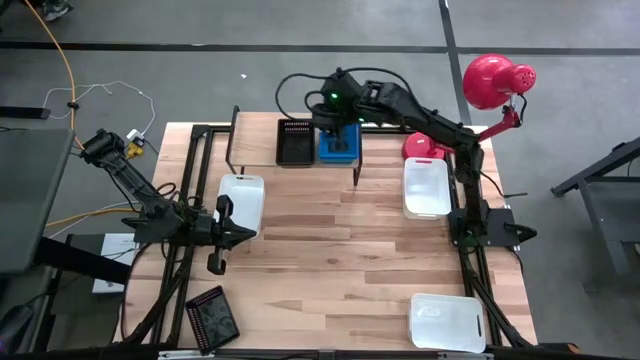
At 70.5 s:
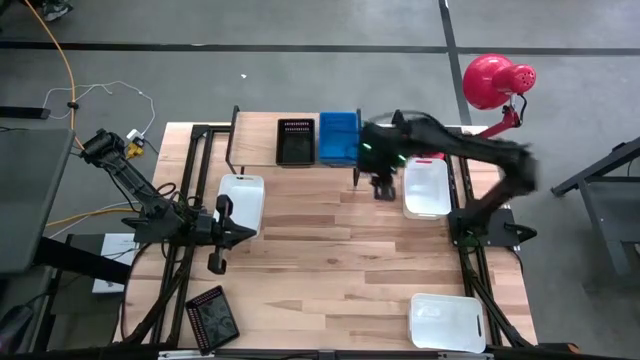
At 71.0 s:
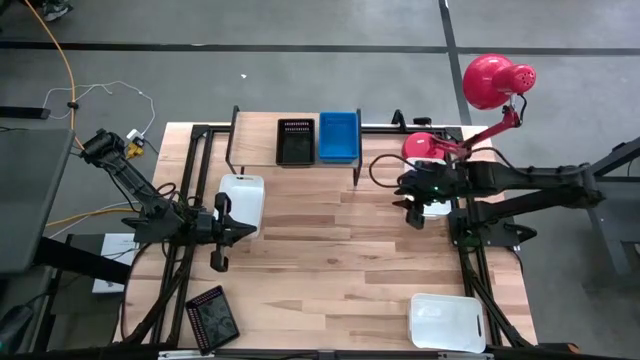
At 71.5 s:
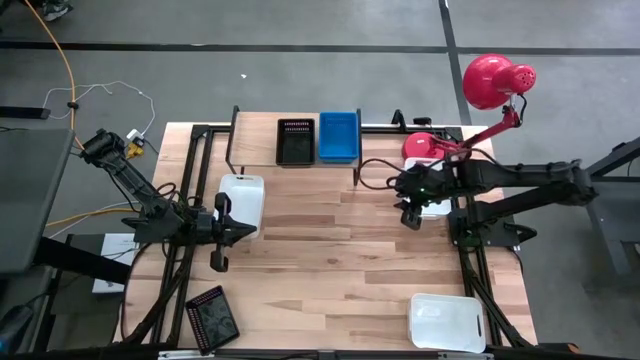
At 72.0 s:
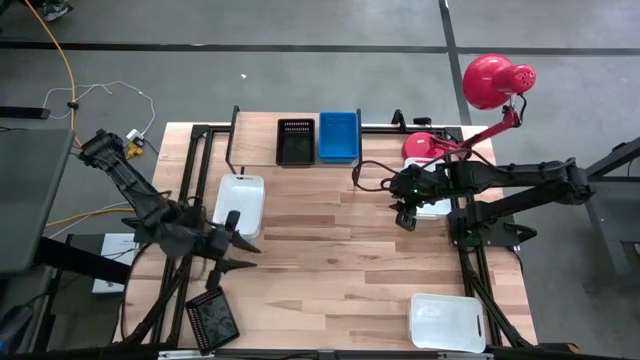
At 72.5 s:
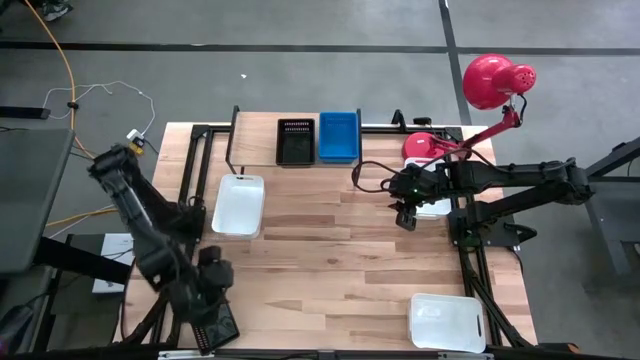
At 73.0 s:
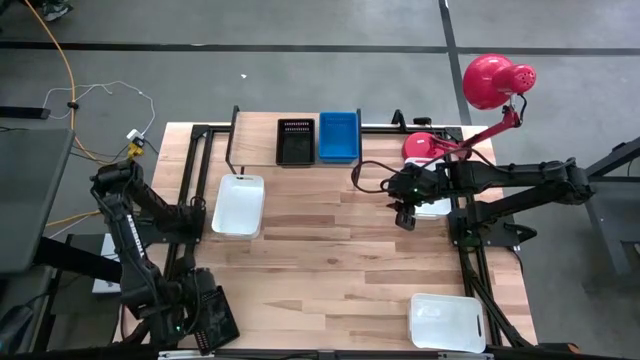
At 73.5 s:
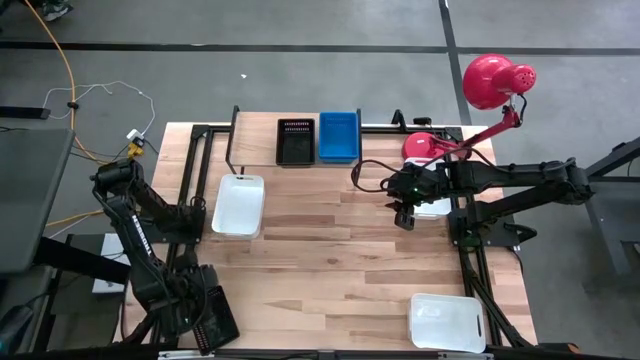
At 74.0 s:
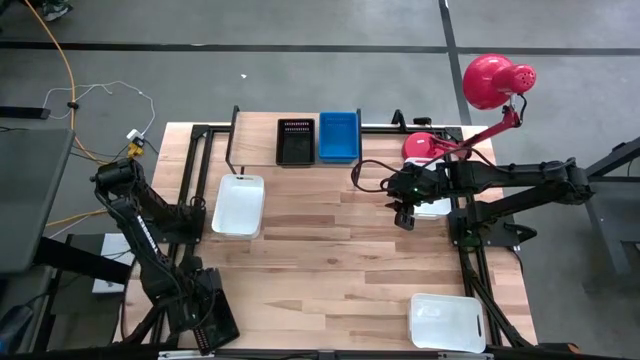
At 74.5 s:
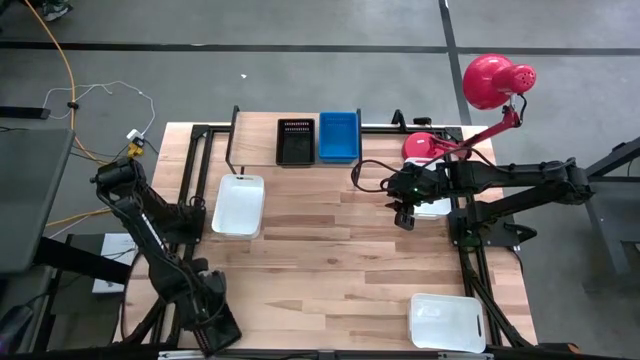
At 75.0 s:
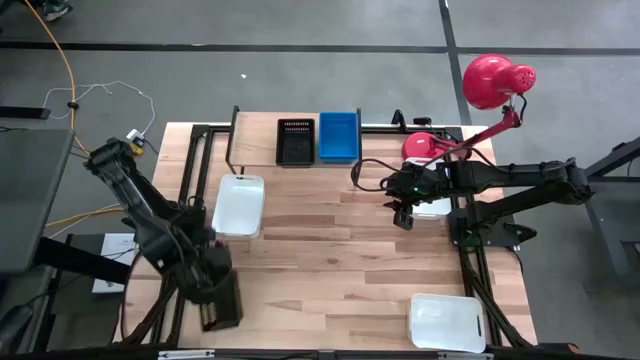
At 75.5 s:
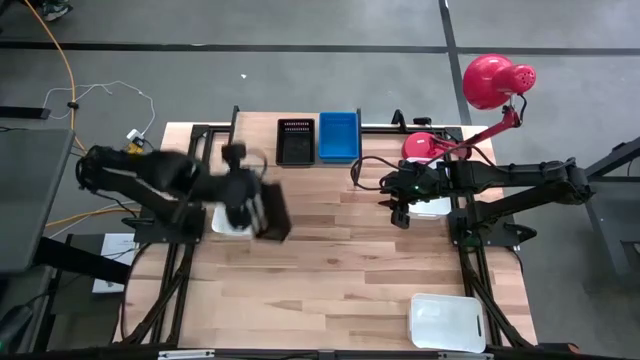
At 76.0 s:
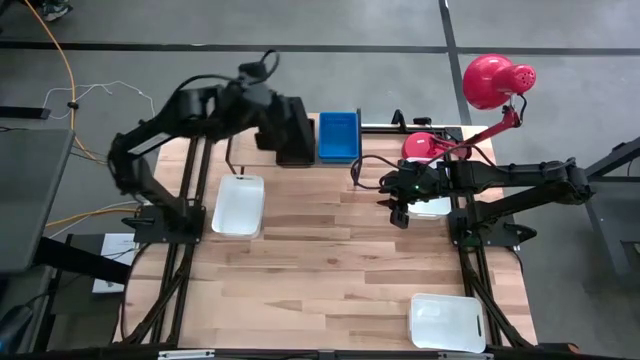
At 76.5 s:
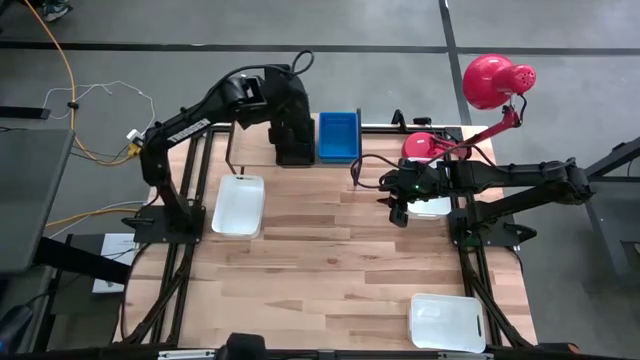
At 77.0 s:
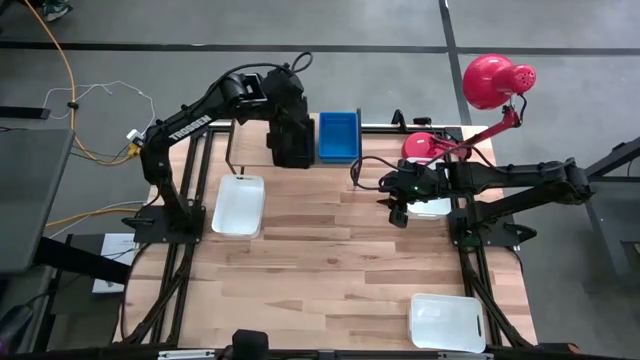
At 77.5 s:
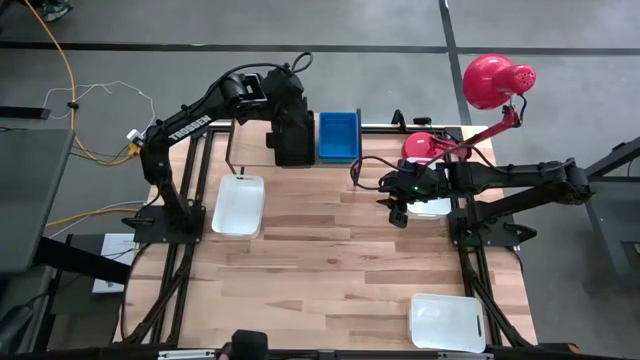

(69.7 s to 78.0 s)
Task: Stack baskets on shelf by color
Stack the black bin on the black bin on the shelf

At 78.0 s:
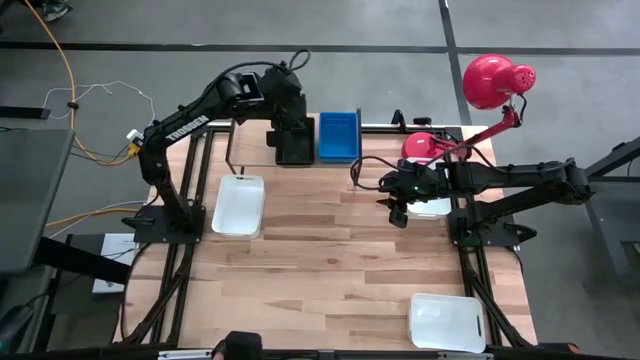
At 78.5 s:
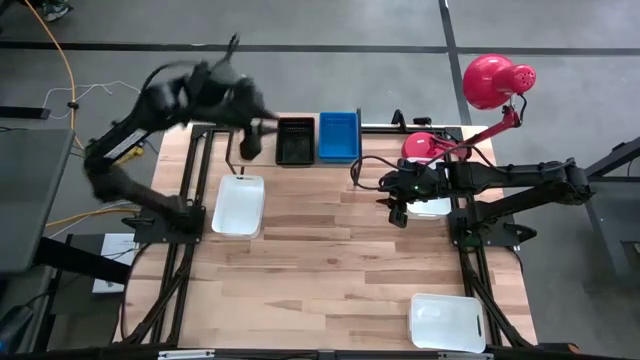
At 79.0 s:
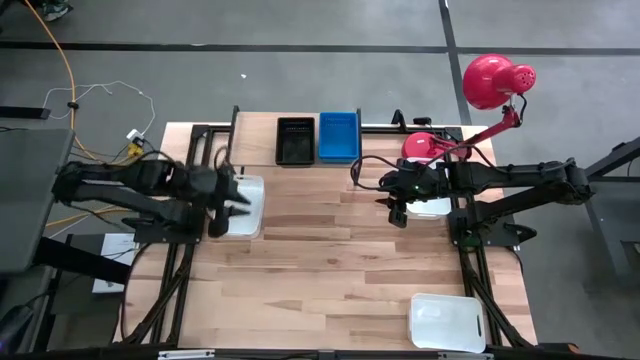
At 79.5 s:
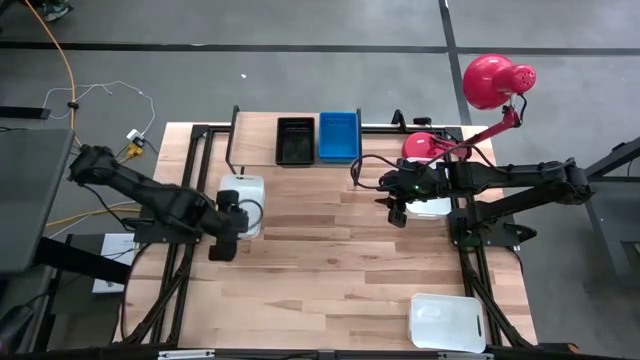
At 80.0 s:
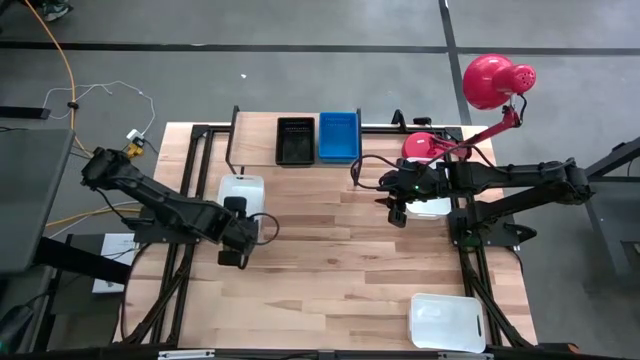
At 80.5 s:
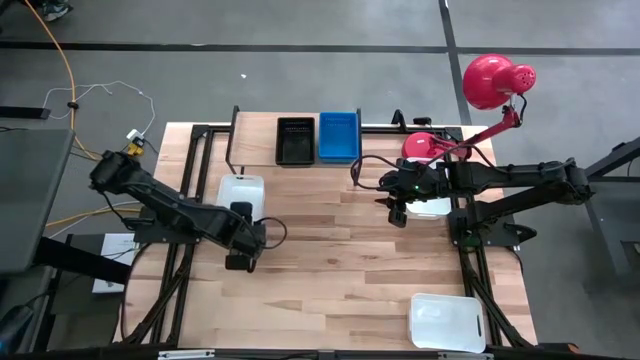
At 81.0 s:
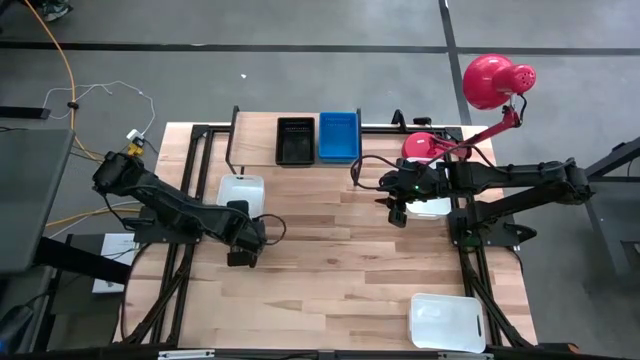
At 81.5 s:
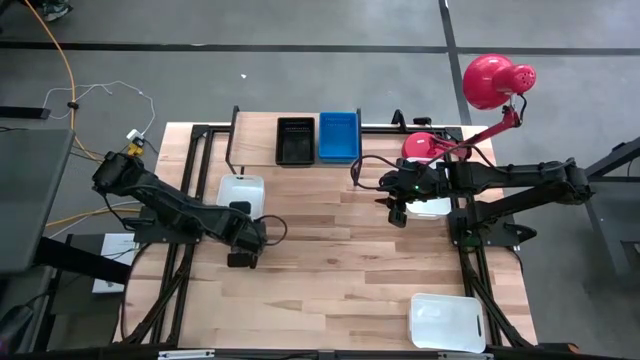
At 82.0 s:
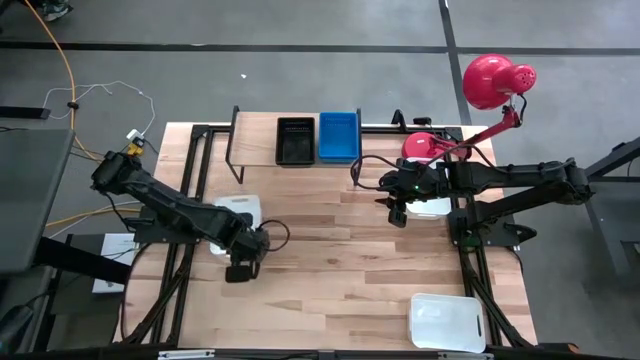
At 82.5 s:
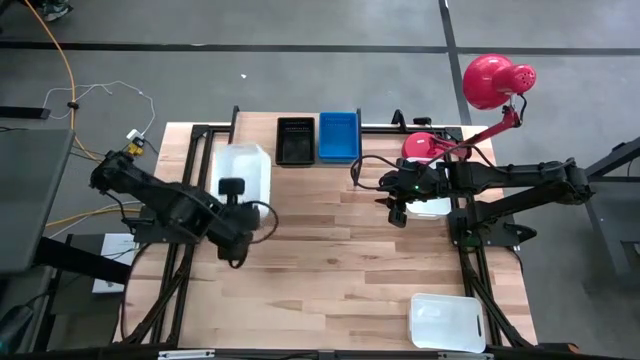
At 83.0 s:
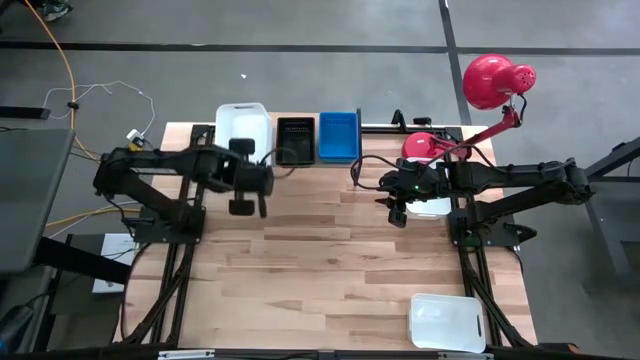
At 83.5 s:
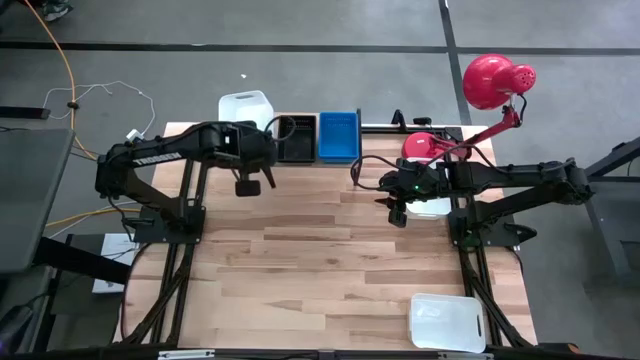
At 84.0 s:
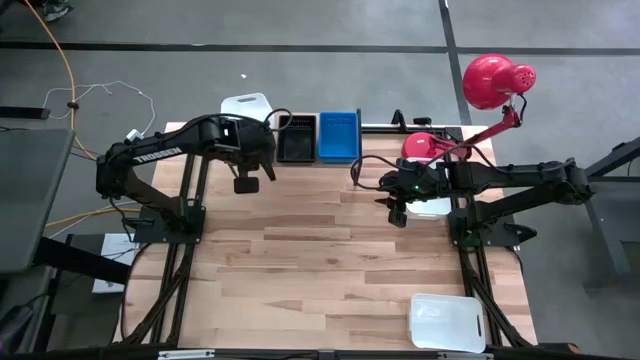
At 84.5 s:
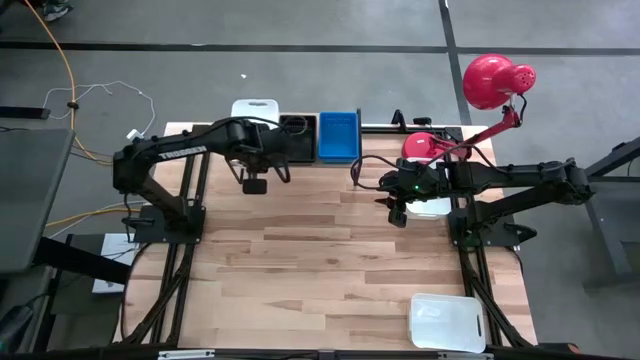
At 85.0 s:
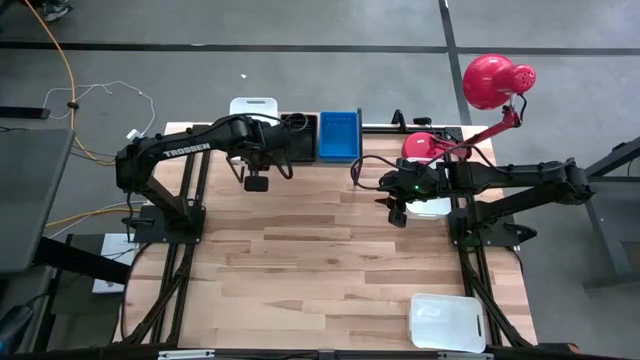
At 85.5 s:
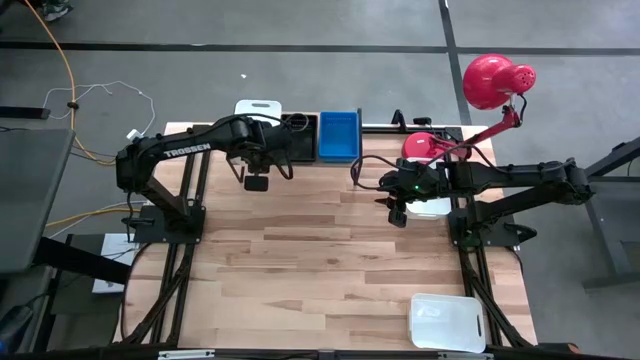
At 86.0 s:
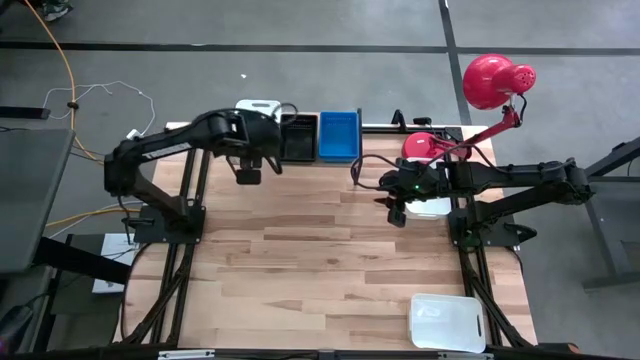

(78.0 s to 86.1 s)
Put the top left white bin on the shelf

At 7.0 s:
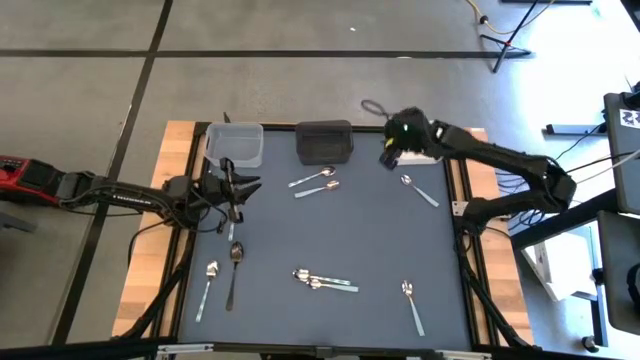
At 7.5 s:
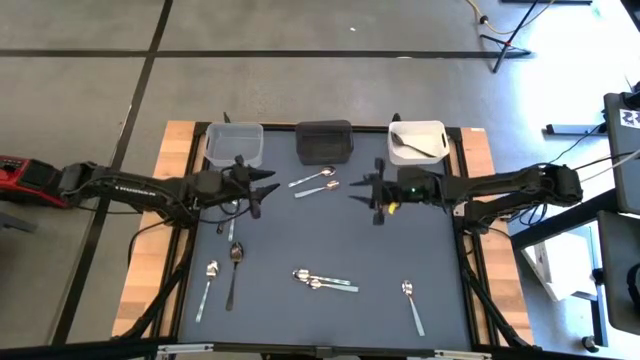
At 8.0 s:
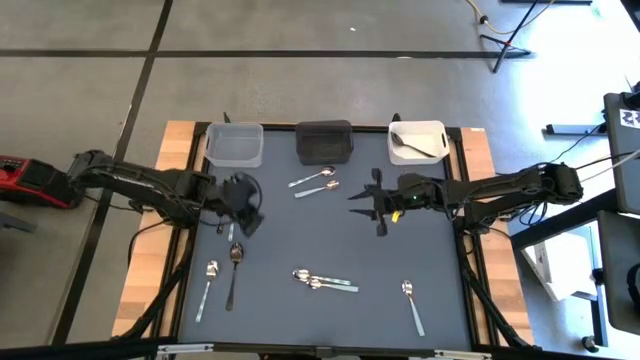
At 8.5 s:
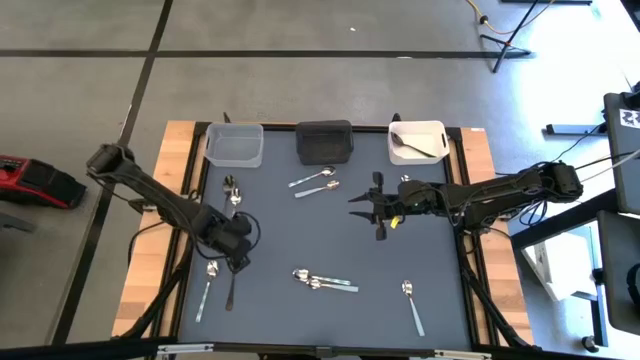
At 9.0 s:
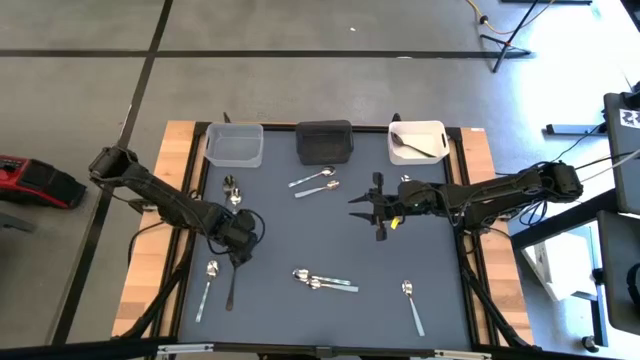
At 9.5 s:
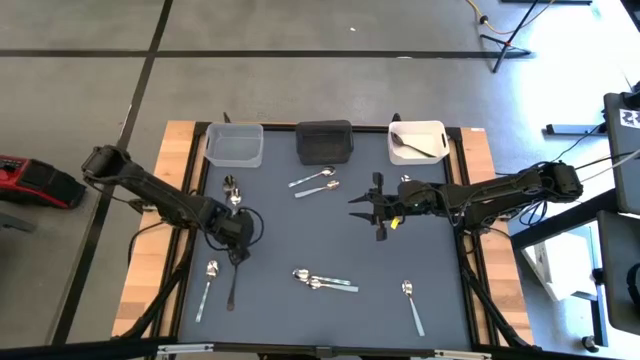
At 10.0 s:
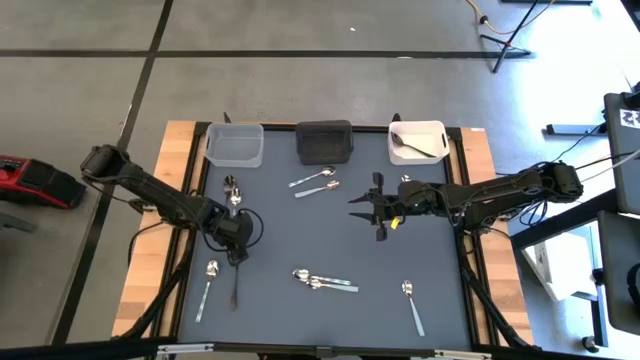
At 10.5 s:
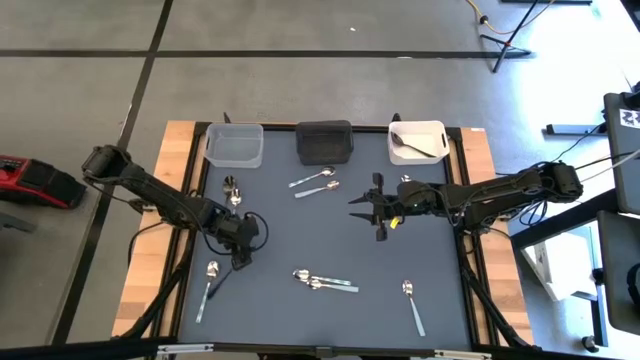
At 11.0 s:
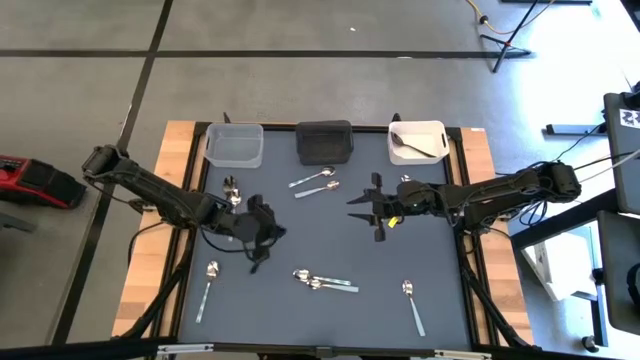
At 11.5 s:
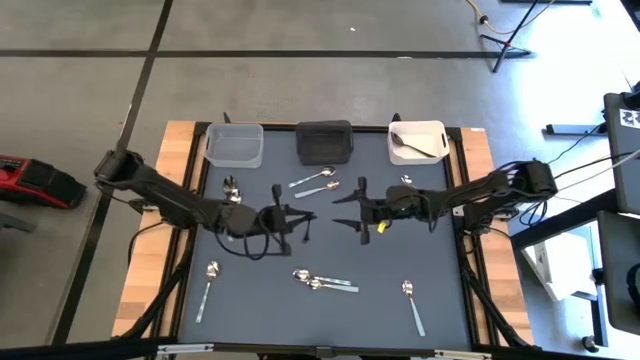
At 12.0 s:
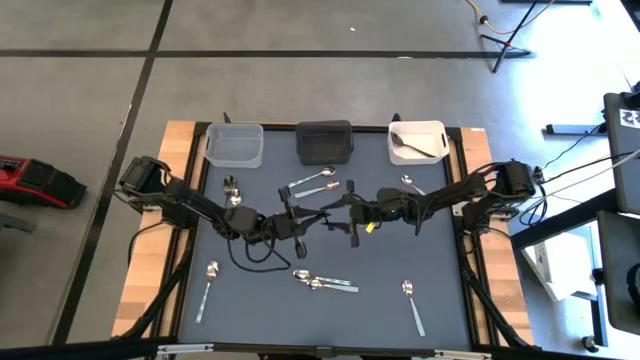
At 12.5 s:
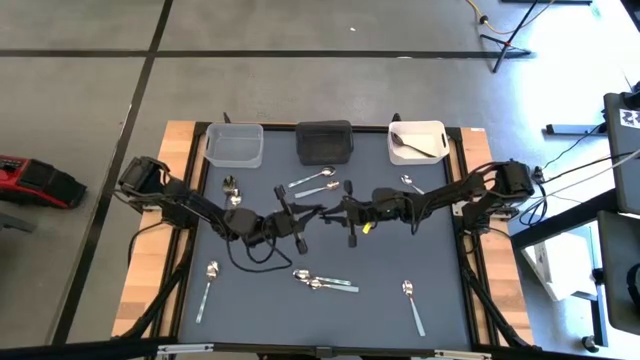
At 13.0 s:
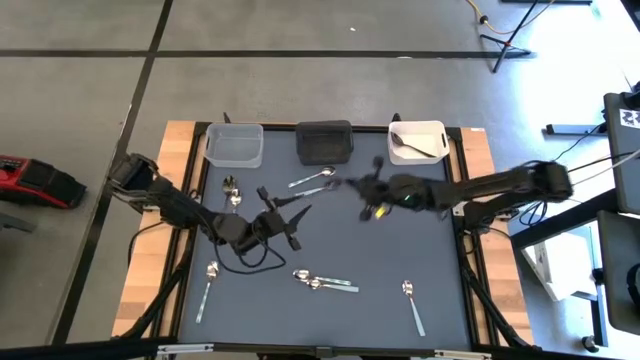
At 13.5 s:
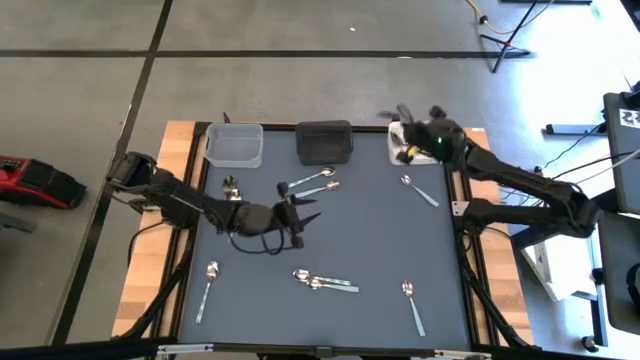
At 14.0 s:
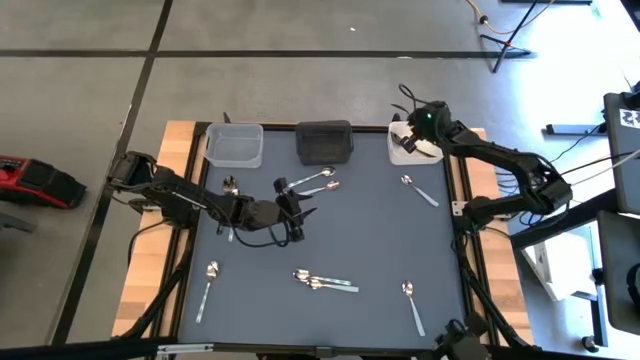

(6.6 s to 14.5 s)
Task: Sort silverware by color (type)
Put the black spoon into the white bin
